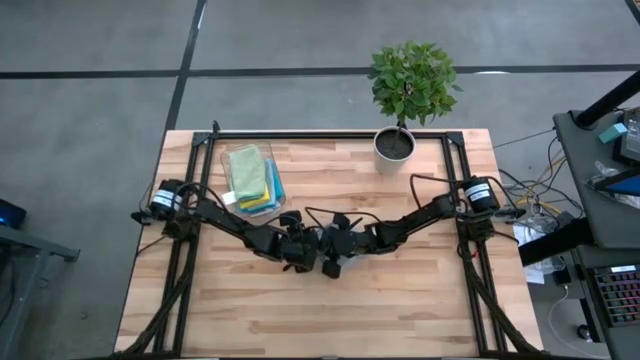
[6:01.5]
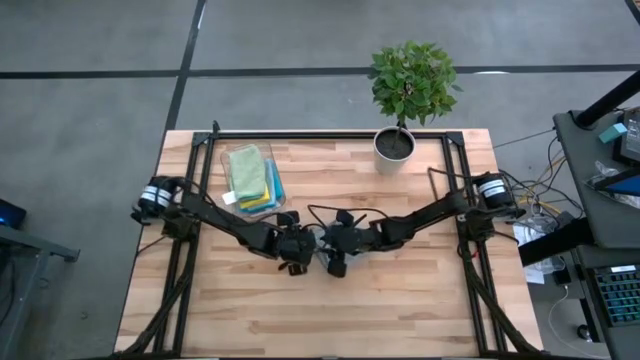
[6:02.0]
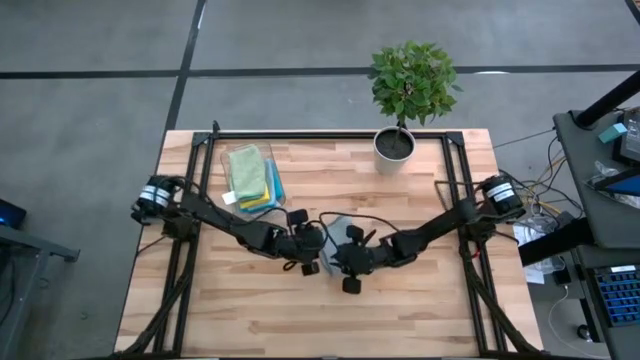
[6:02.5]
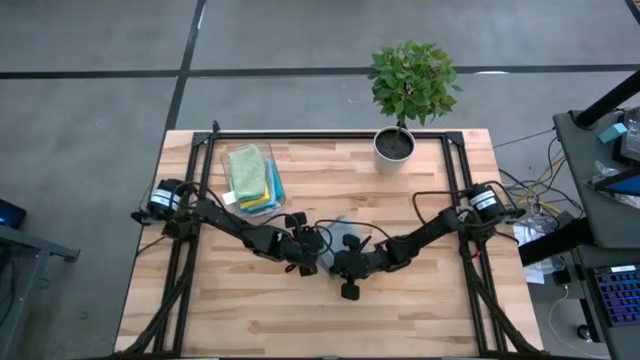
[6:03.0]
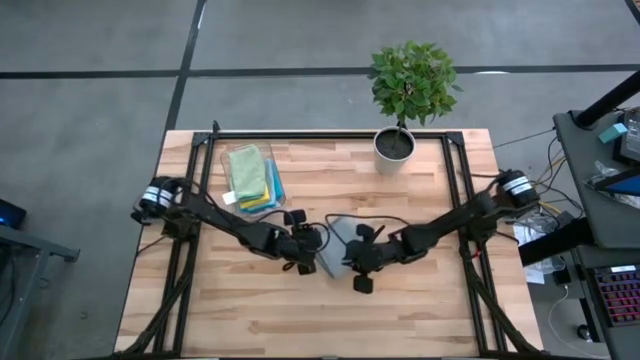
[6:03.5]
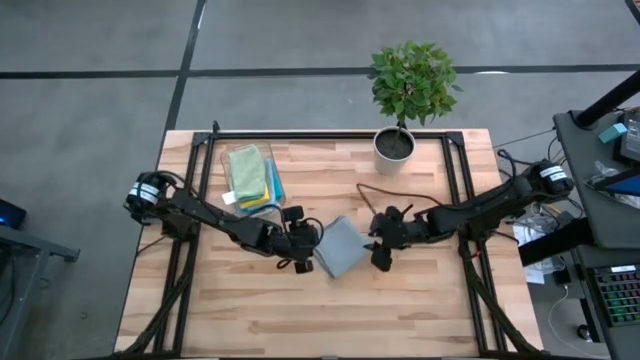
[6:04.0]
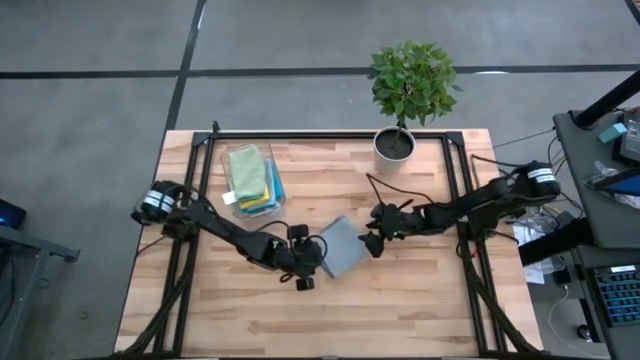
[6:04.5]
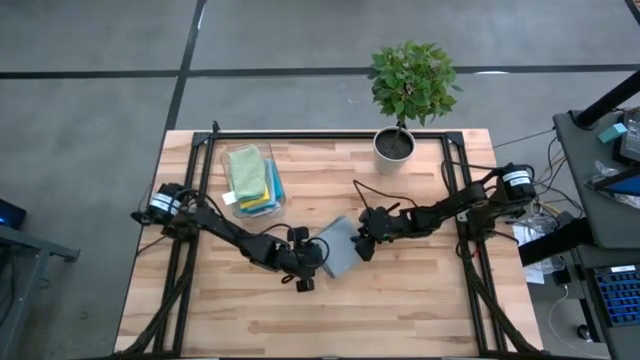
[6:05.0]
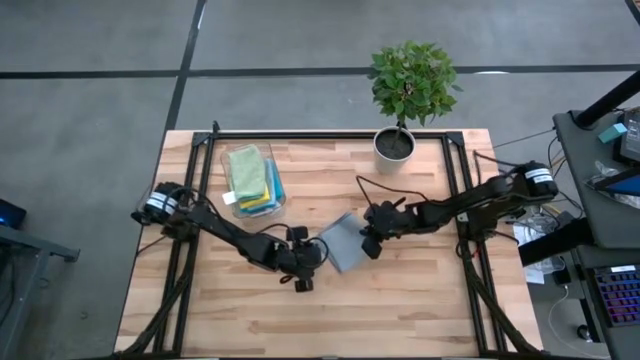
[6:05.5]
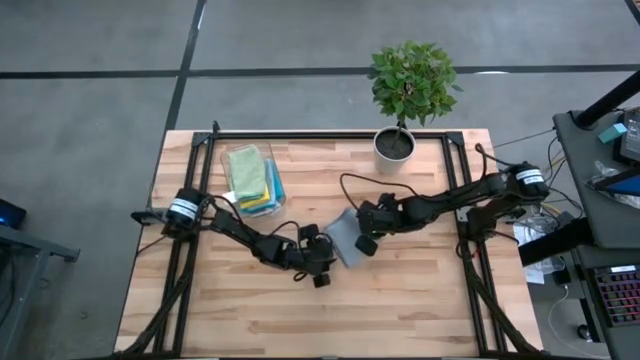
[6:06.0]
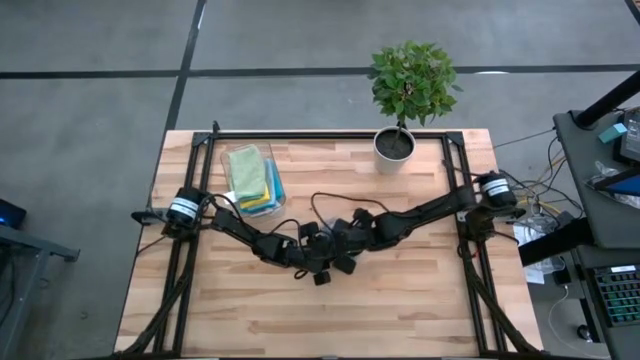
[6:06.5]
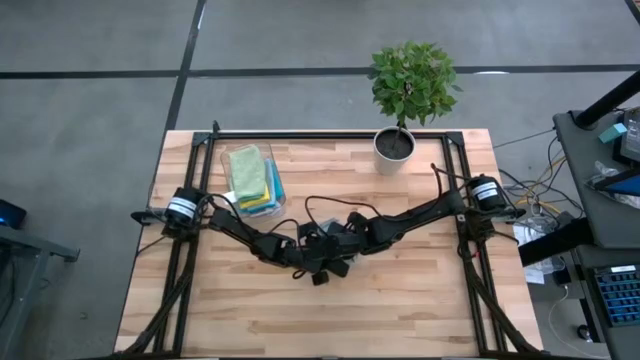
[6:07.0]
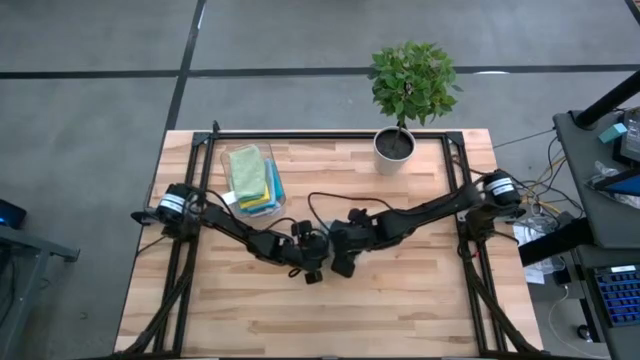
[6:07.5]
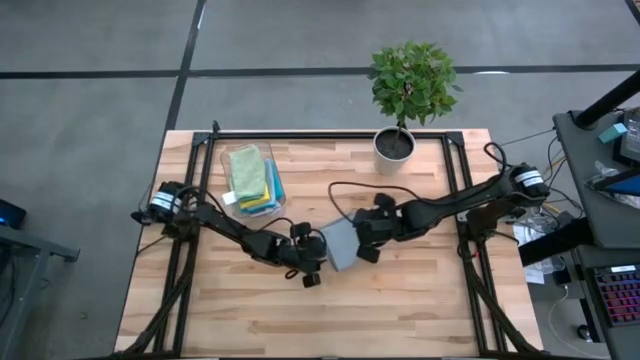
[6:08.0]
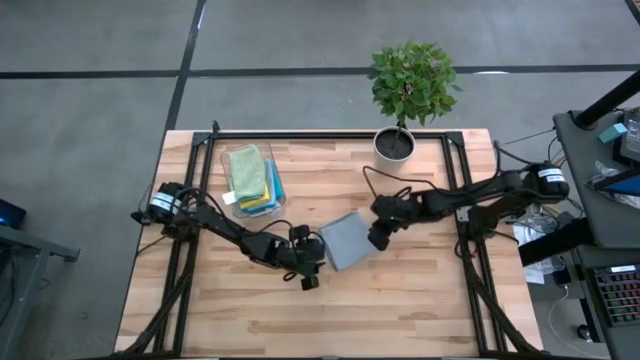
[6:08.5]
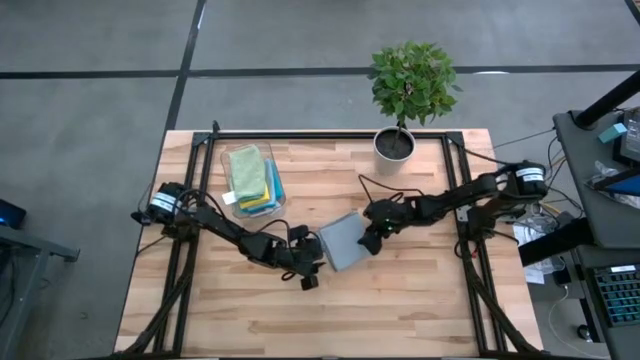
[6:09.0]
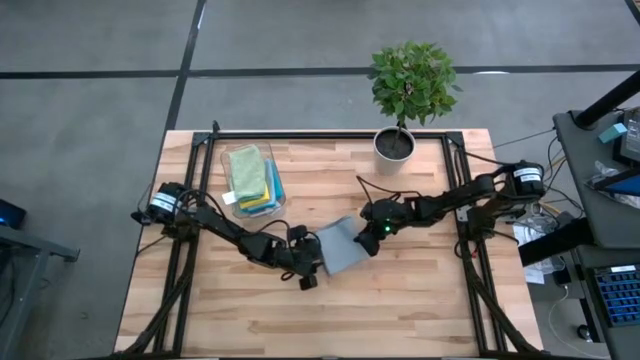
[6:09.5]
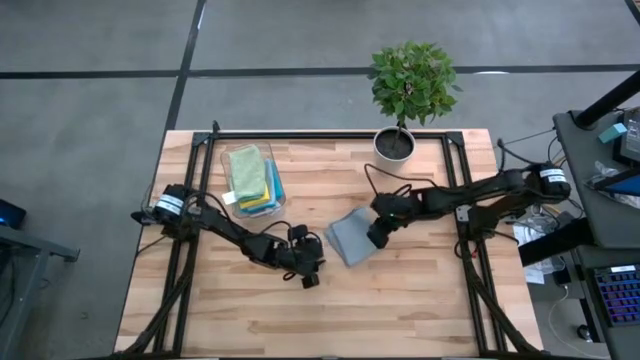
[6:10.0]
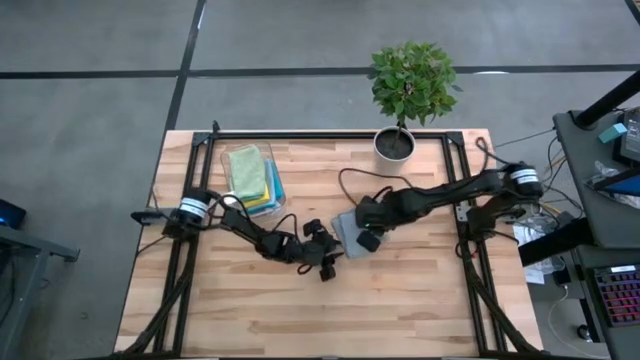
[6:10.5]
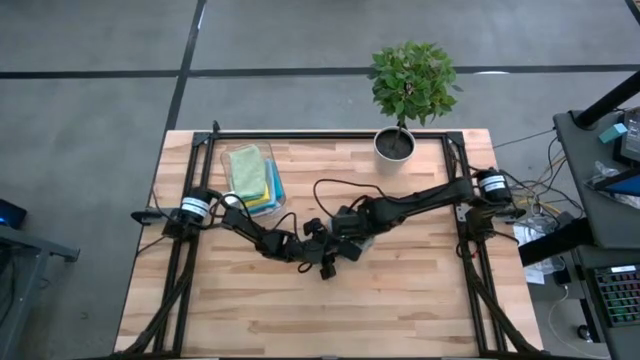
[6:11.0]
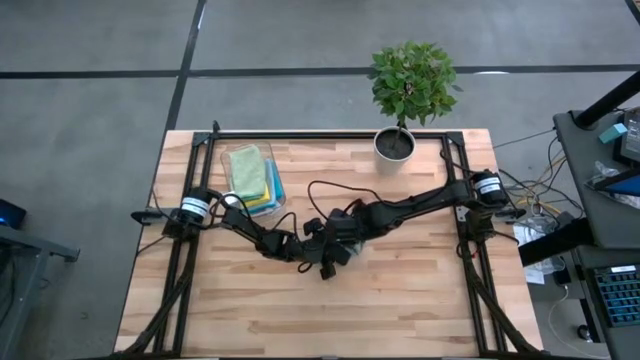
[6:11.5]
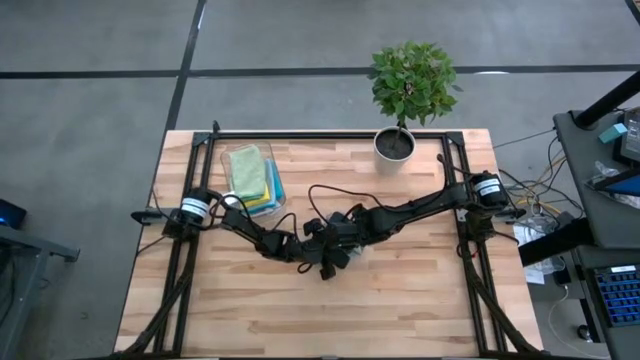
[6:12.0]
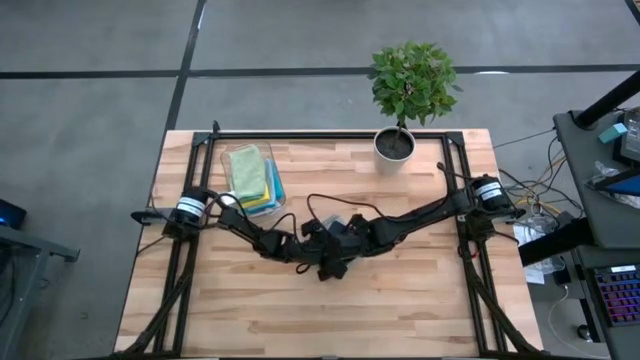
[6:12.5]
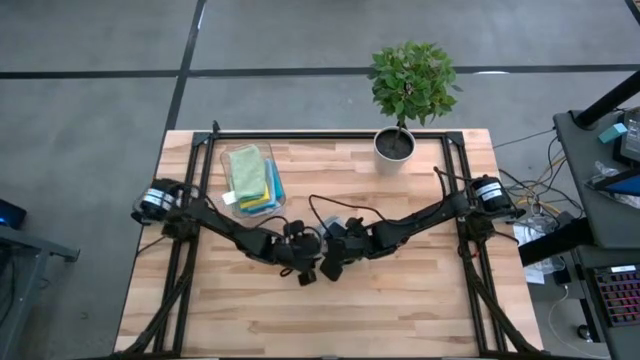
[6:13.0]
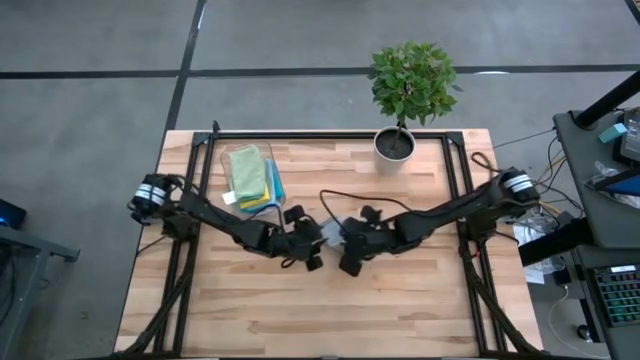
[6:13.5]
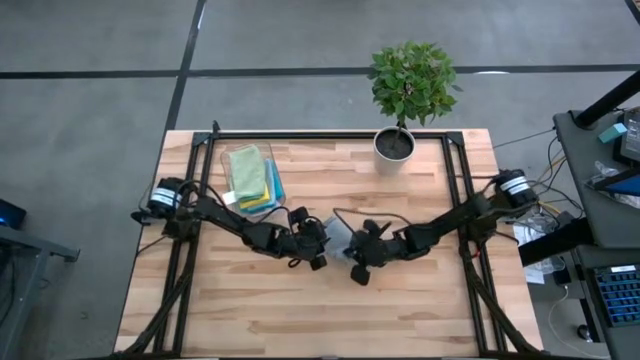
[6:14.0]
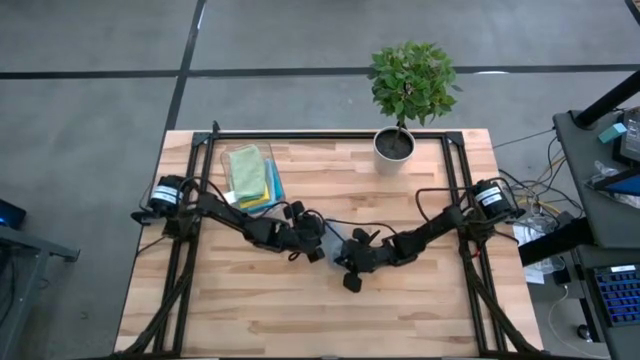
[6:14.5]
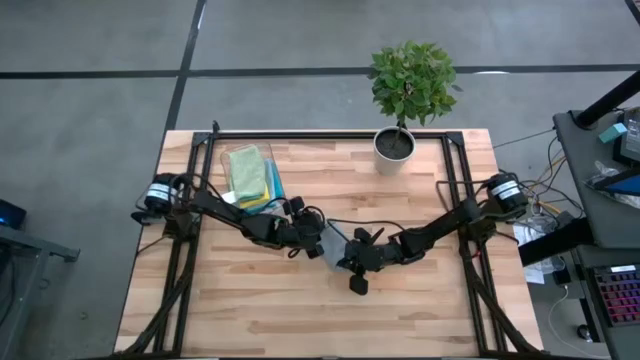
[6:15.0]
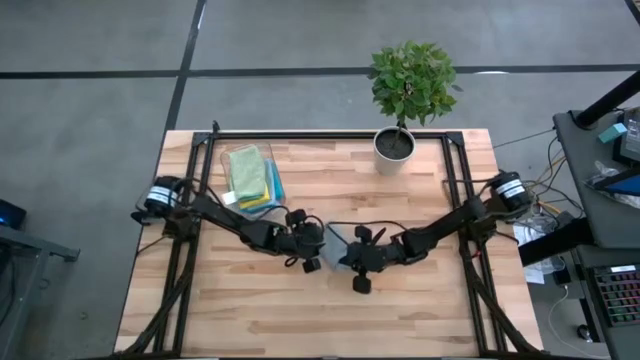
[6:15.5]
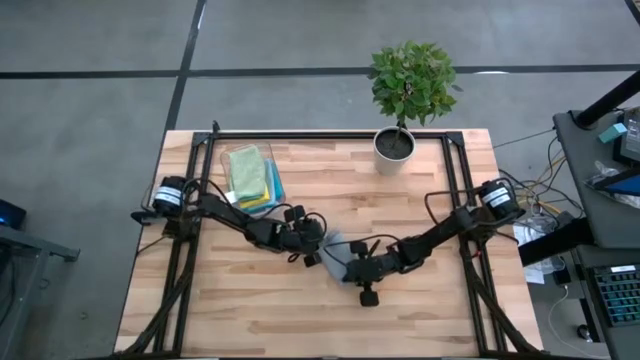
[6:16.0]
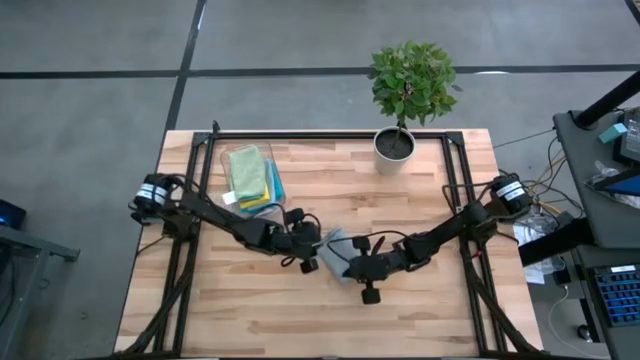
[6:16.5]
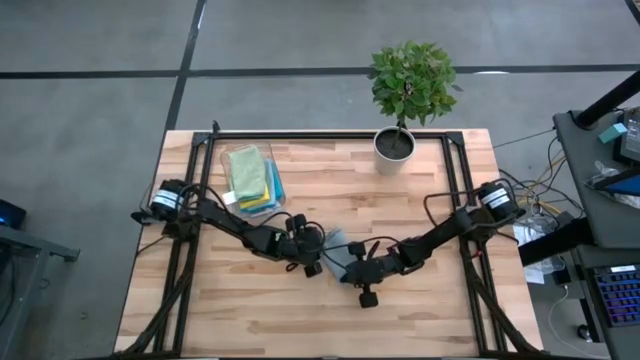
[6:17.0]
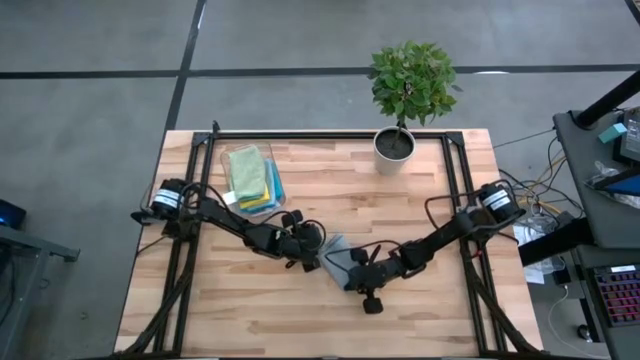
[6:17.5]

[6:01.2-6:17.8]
Task: Fold microfiber towels
Fold the gray microfiber cloth

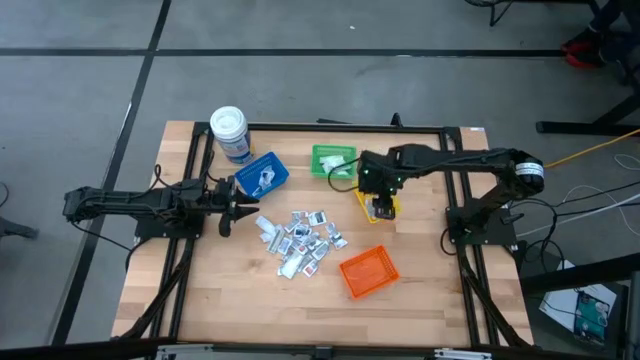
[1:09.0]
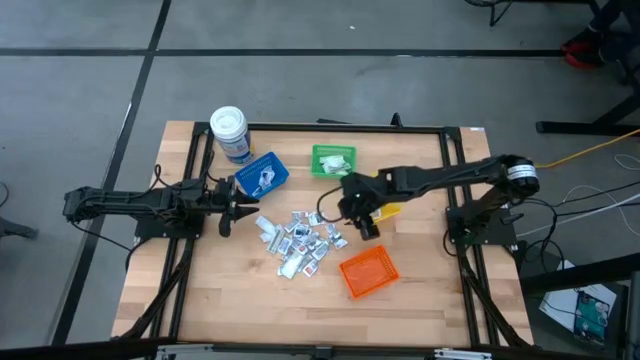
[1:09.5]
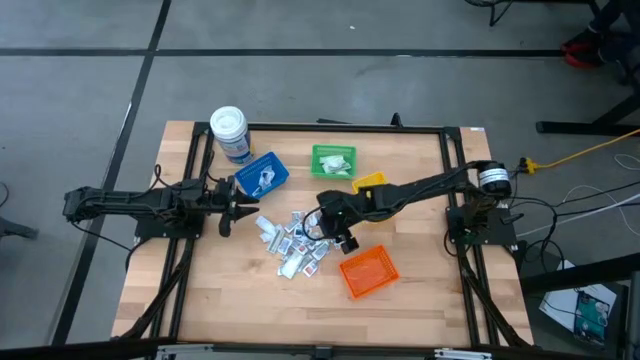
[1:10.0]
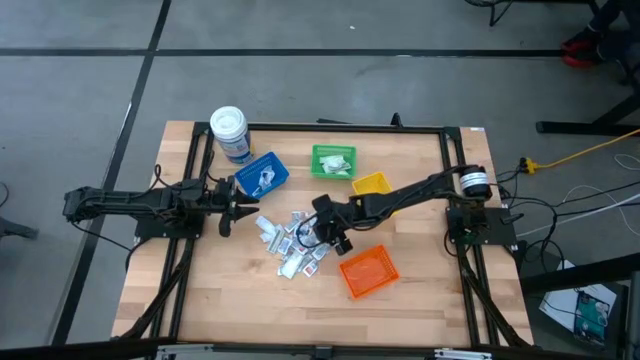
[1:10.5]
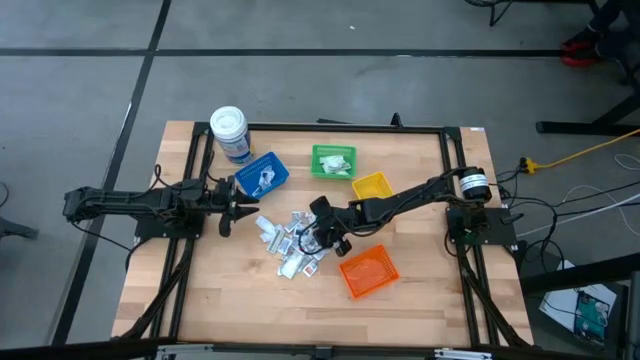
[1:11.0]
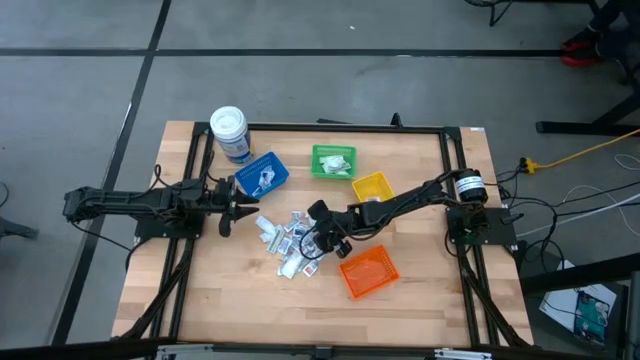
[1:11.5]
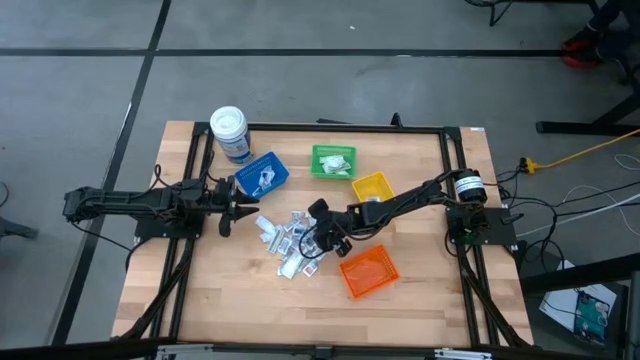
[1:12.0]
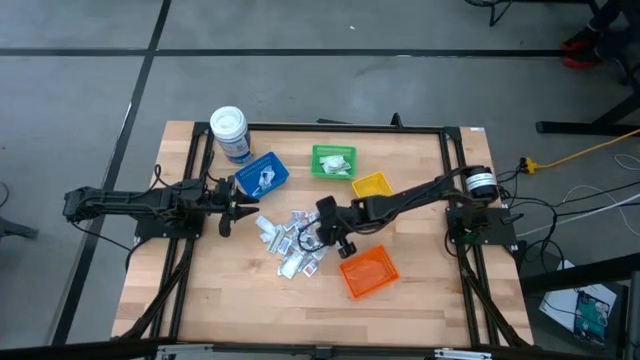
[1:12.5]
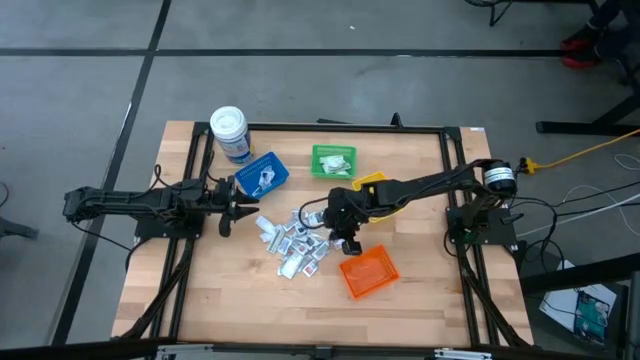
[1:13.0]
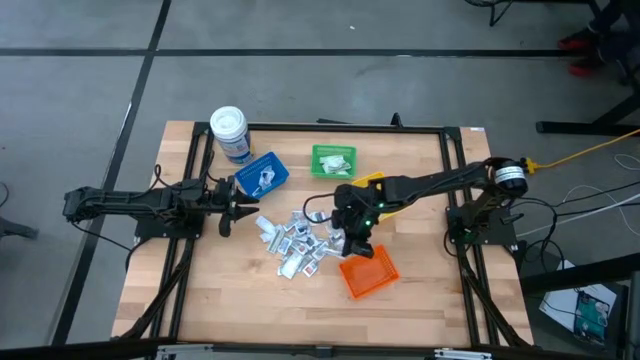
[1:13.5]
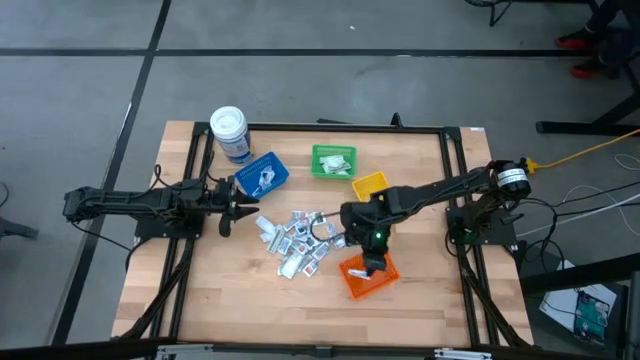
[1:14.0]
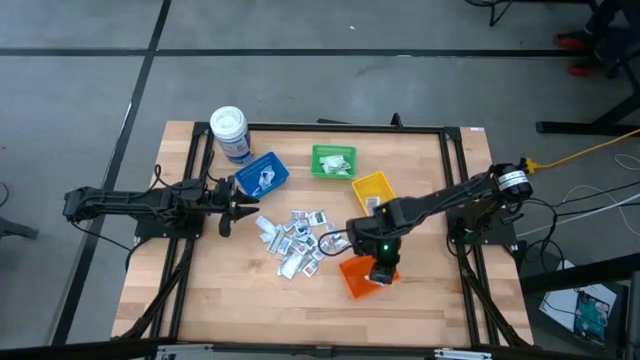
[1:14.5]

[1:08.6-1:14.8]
Task: Pick & Place First Aid Supplies
Put the white ointment pack into the orange bin
